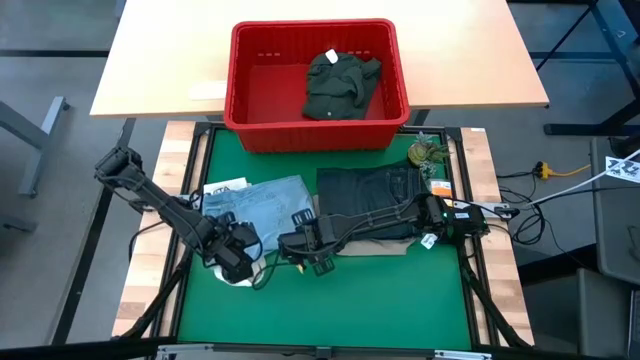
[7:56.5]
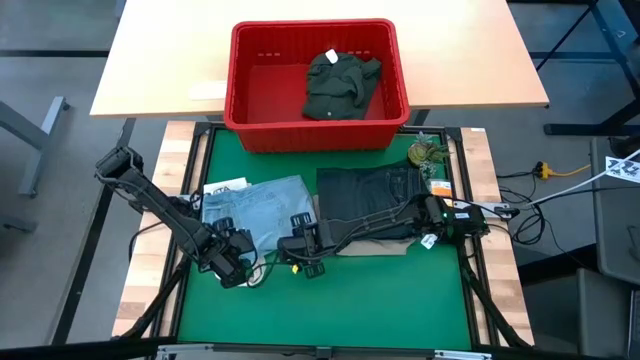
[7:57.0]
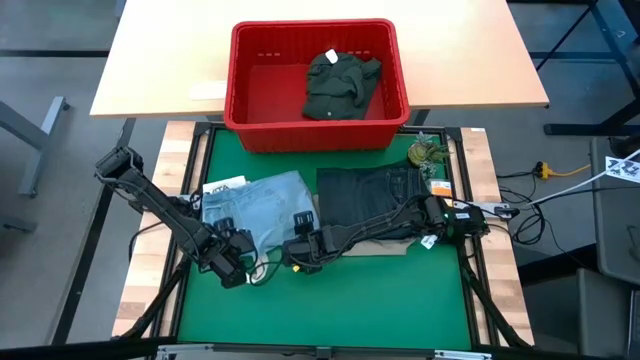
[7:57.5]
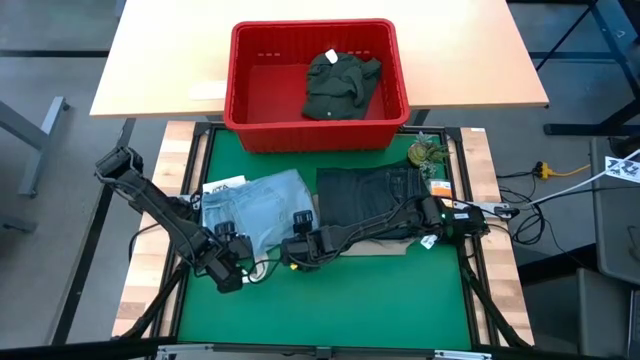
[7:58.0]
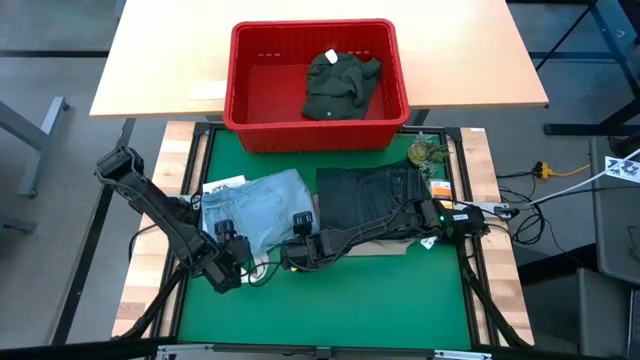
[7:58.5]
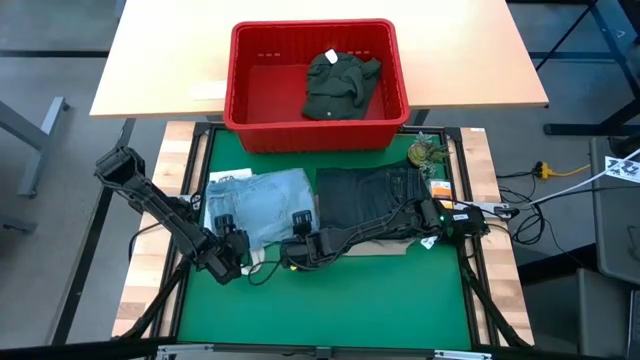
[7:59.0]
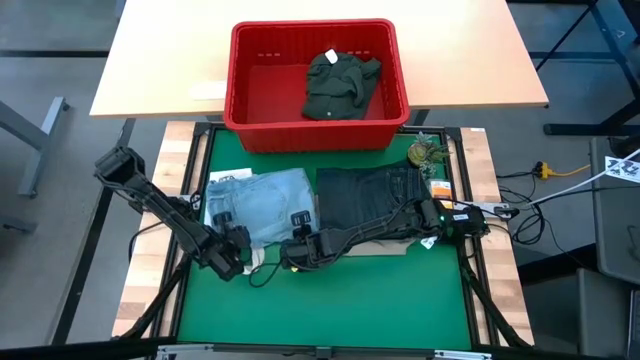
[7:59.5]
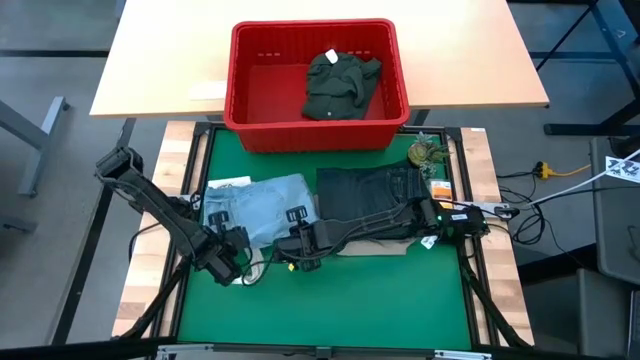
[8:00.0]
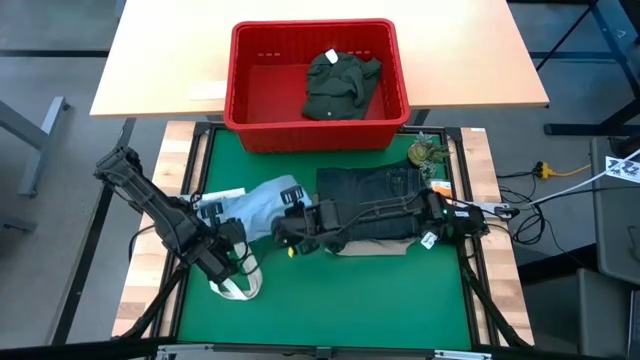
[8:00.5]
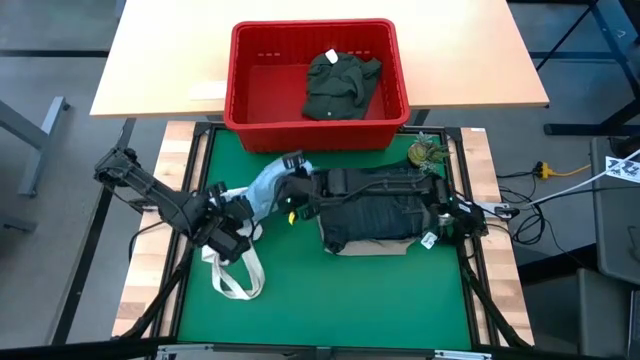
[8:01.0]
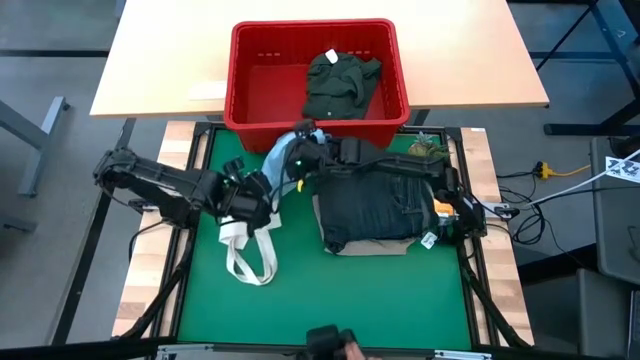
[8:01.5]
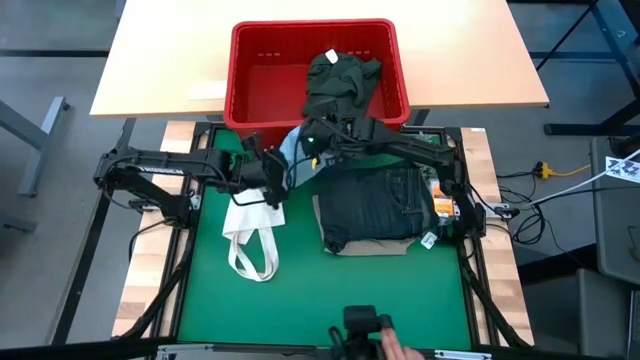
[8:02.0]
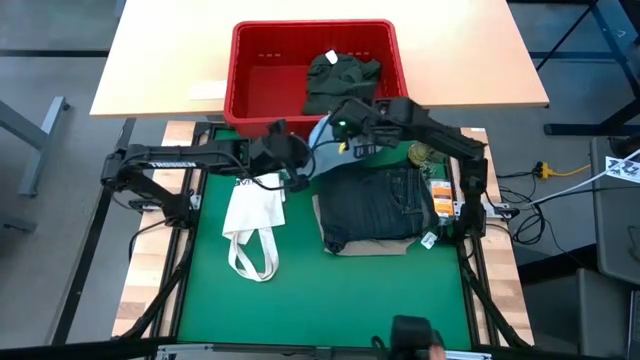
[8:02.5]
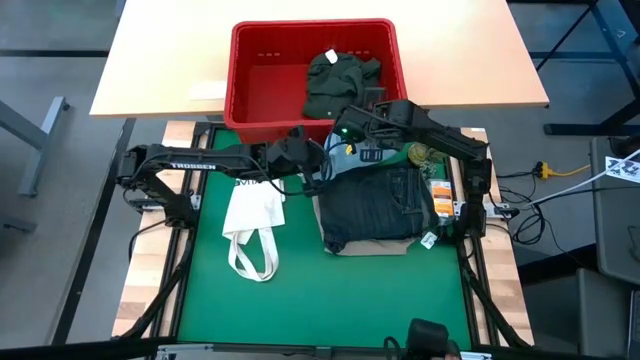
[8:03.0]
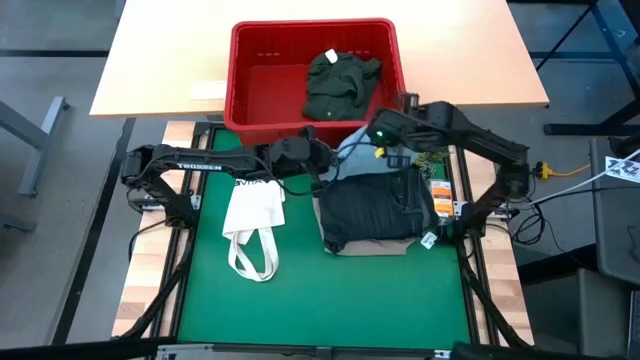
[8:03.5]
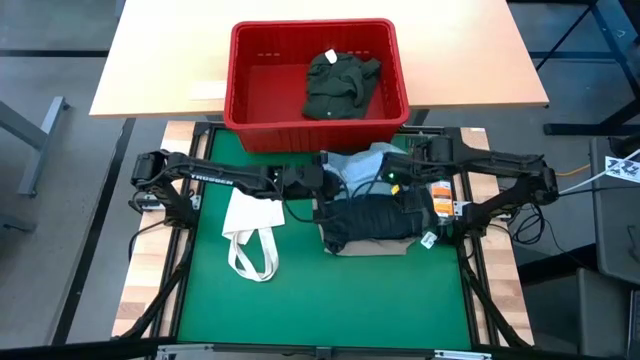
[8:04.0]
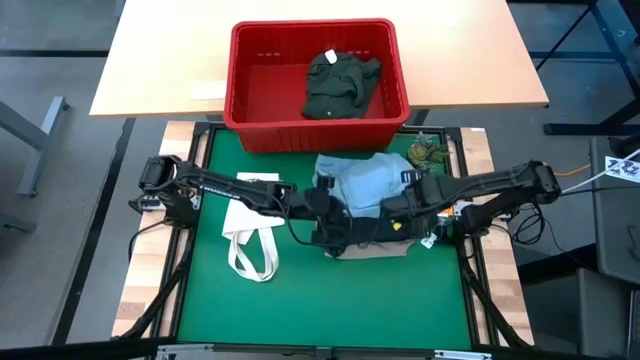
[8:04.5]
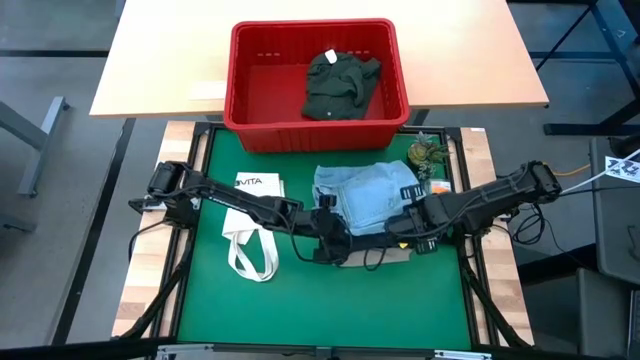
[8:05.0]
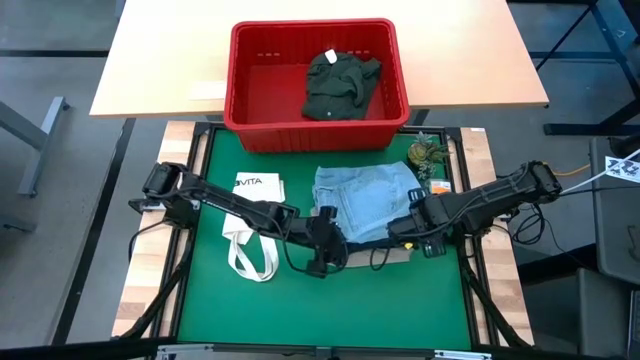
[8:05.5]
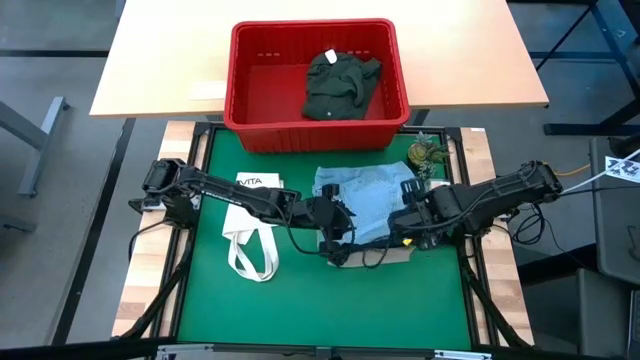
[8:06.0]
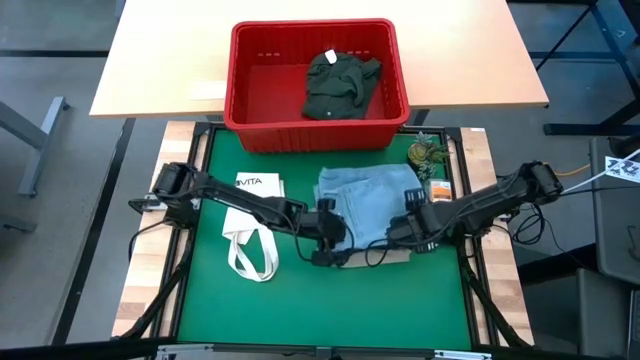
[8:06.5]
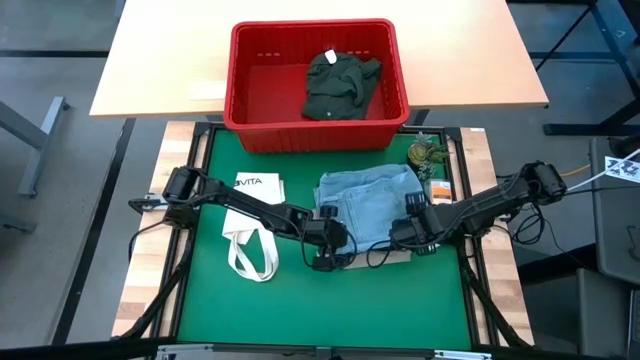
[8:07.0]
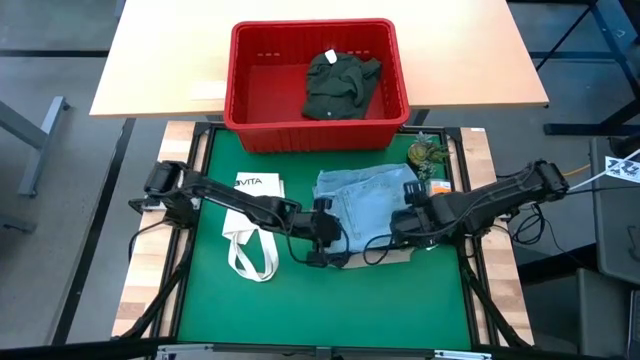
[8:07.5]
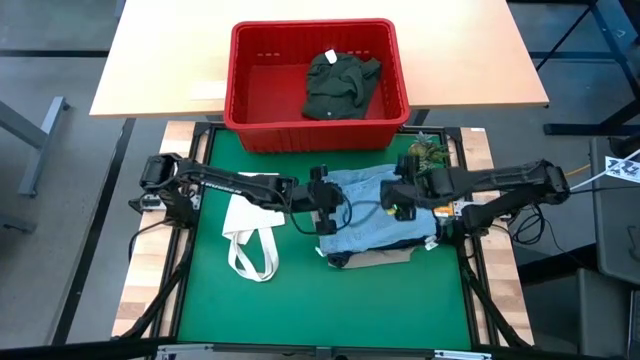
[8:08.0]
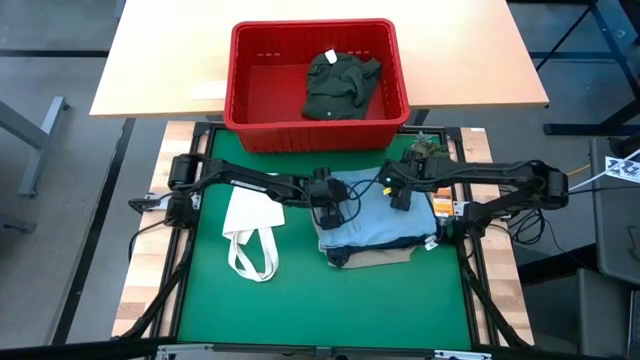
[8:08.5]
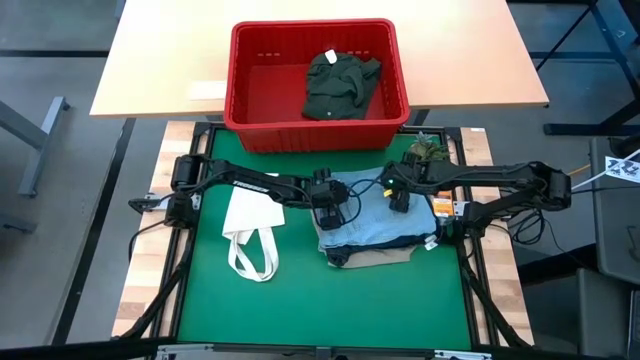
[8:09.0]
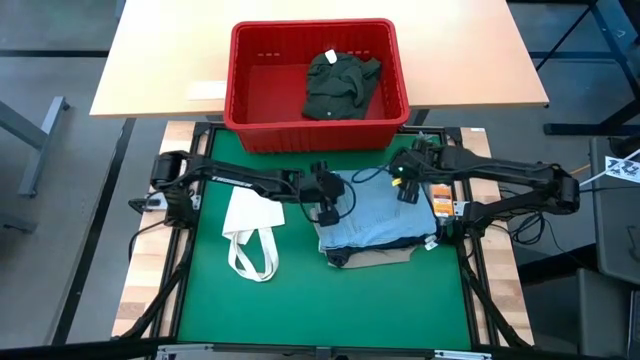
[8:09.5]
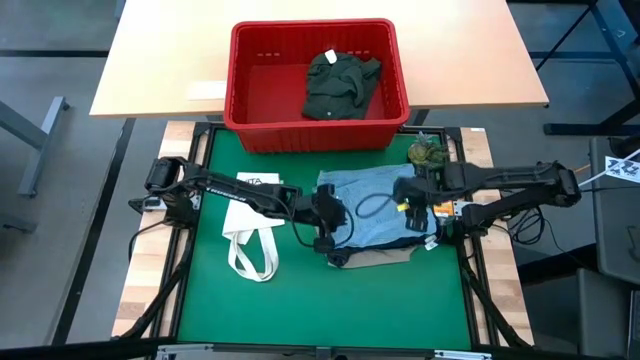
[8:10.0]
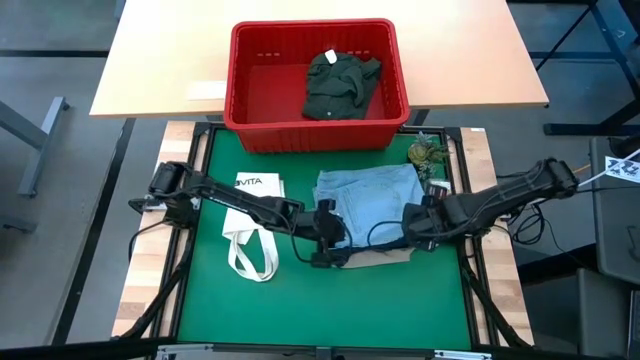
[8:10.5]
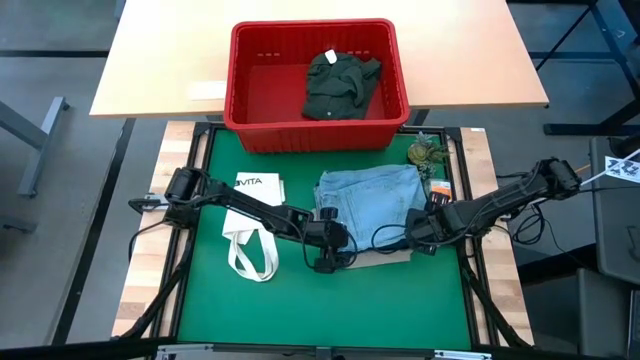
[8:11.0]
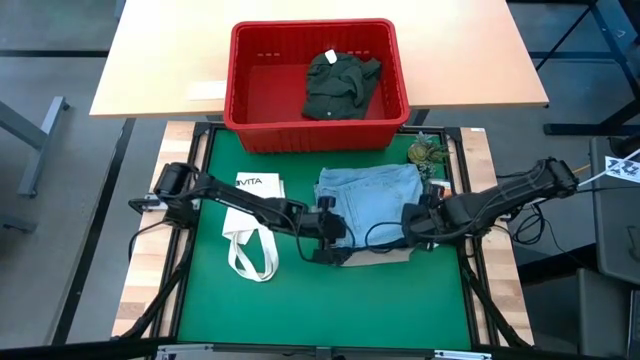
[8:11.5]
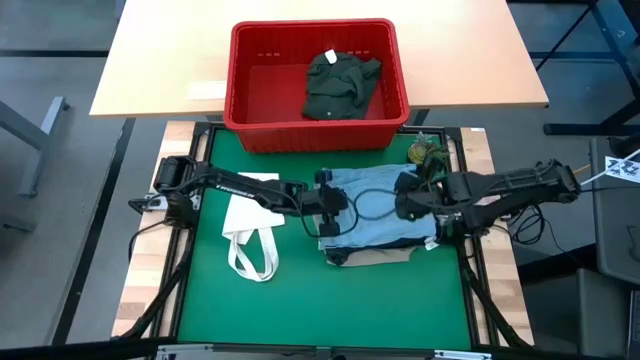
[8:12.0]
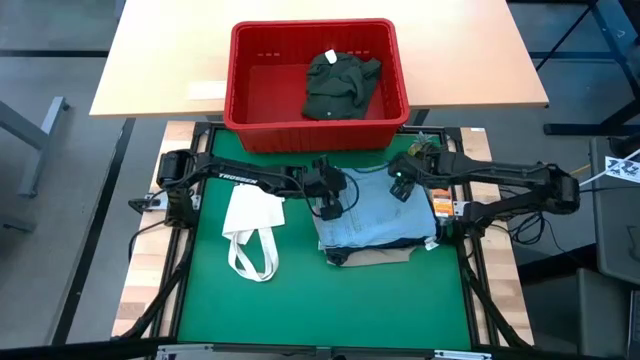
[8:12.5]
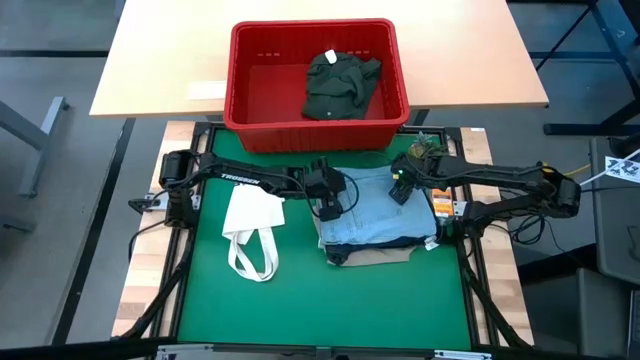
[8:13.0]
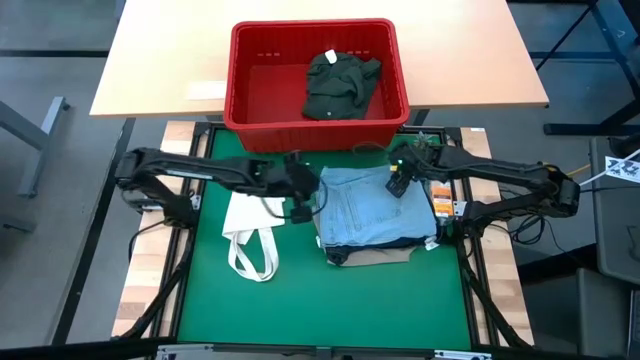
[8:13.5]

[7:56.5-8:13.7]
Task: Fold Laundry from Bin
Stack the light blue jeans on top of the dark blue jeans

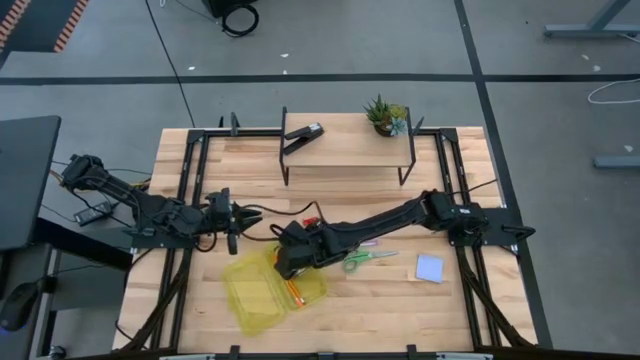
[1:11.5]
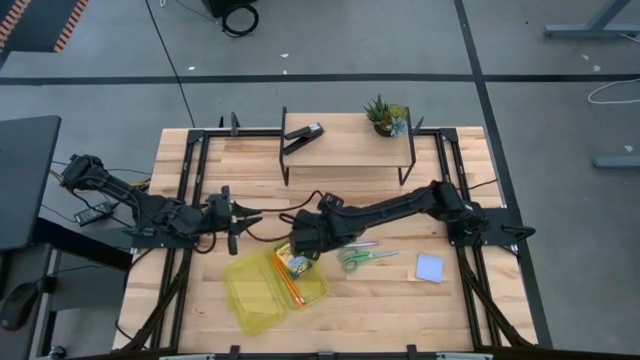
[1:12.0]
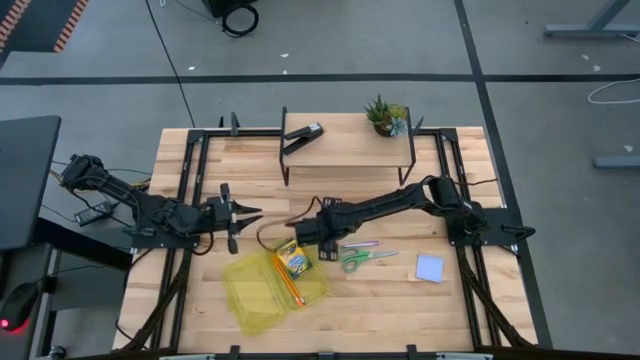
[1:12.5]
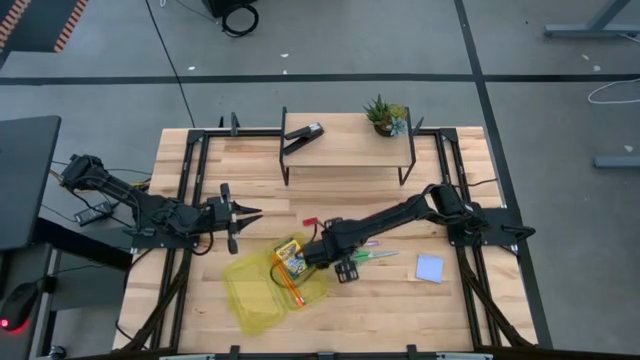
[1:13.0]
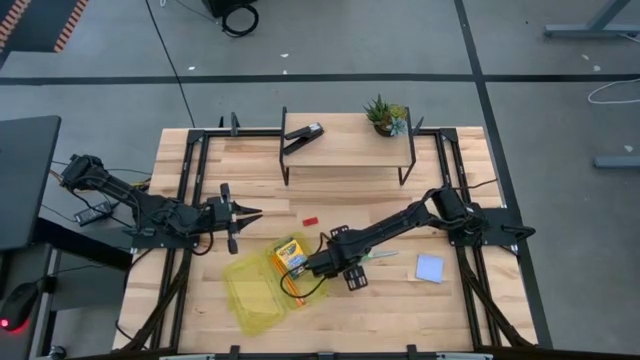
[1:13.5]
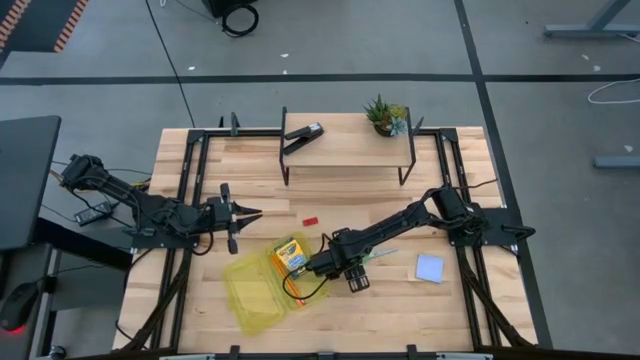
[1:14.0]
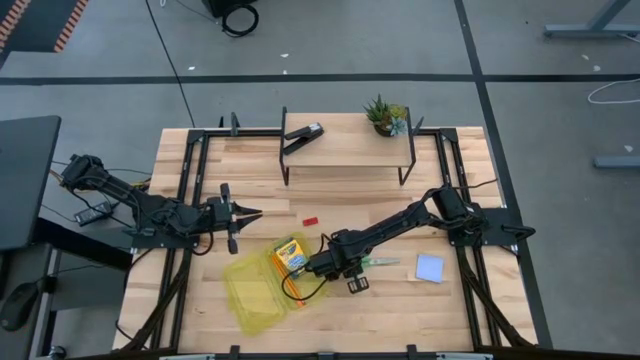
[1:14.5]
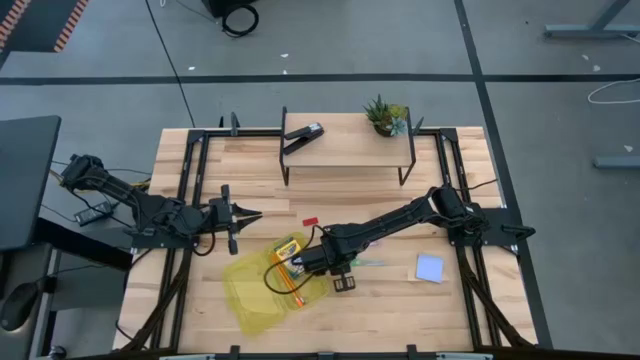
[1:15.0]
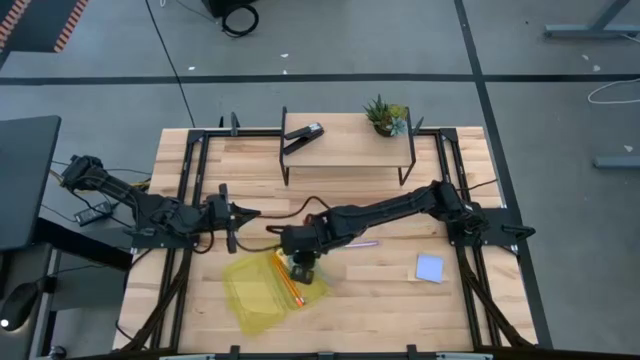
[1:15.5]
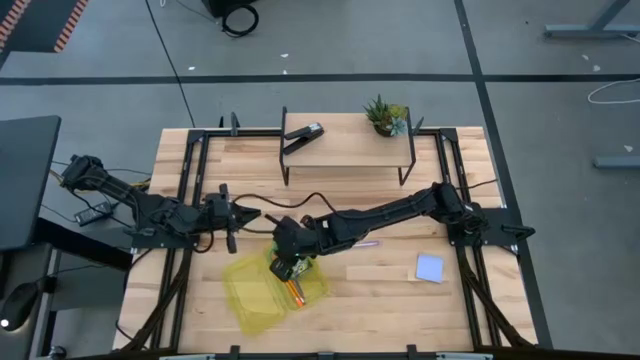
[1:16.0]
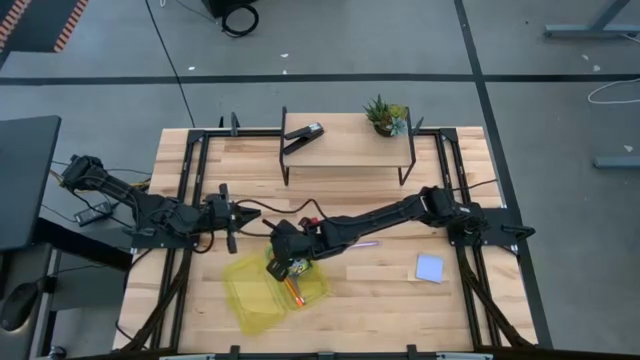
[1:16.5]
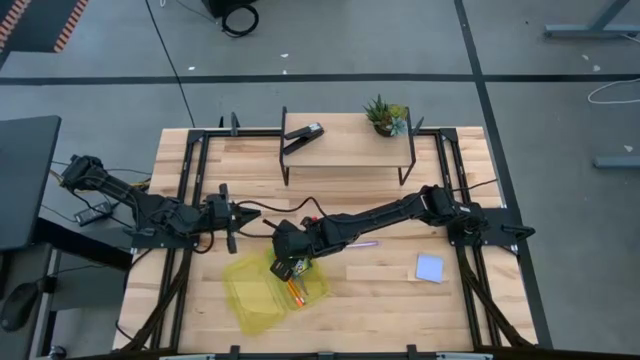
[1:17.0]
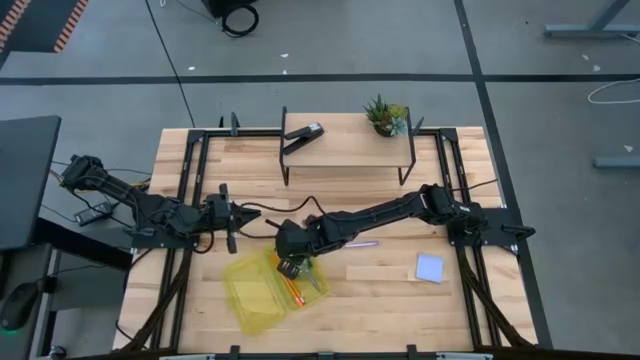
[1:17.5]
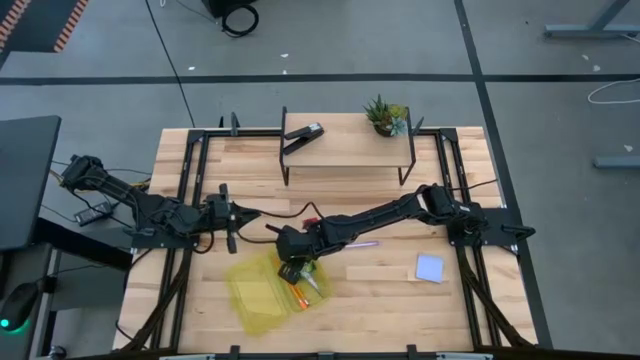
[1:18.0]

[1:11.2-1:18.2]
Task: Pack school essentials
Put the green scissors into the supply box
